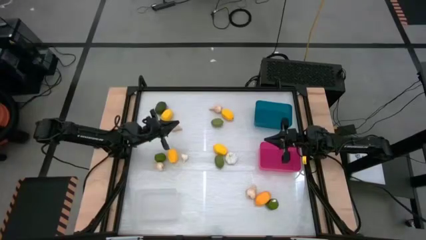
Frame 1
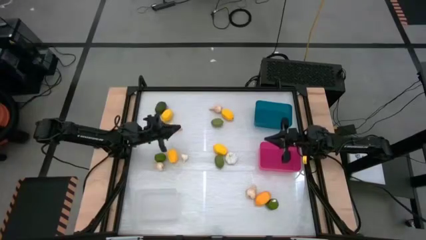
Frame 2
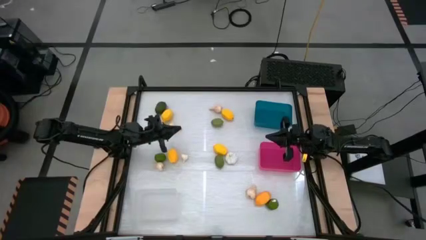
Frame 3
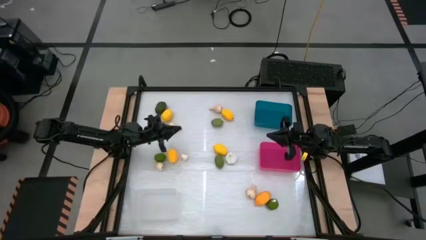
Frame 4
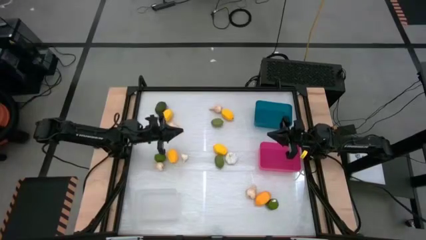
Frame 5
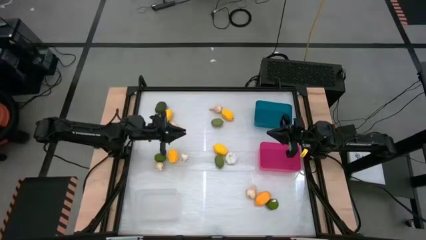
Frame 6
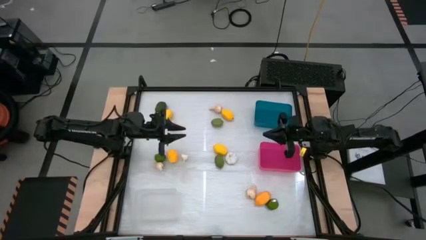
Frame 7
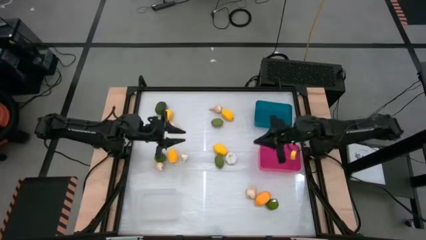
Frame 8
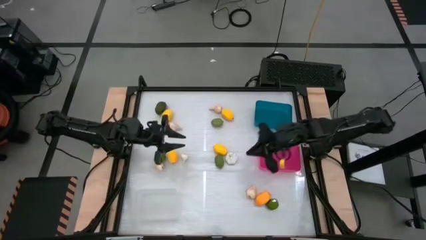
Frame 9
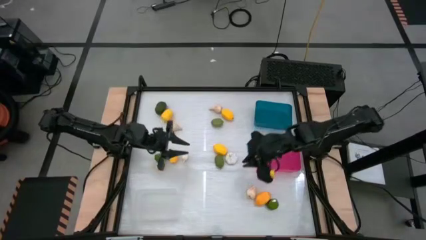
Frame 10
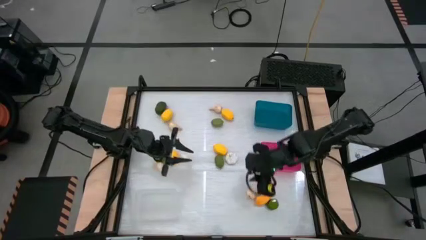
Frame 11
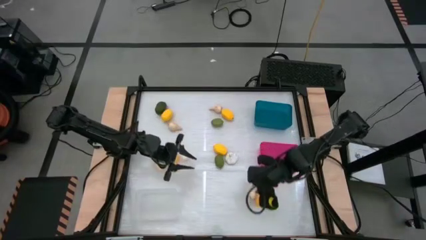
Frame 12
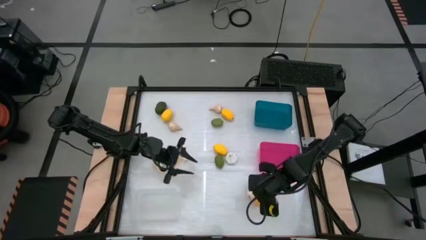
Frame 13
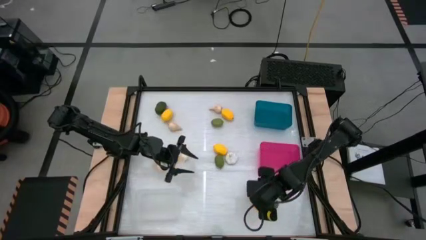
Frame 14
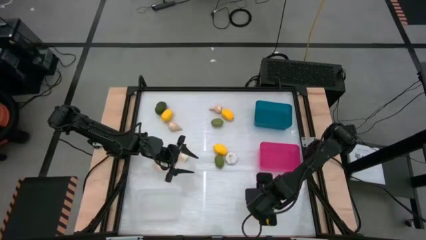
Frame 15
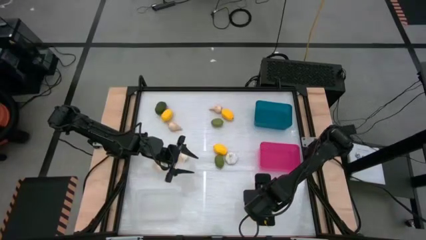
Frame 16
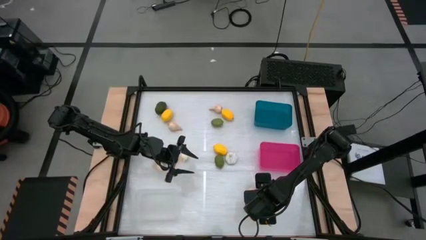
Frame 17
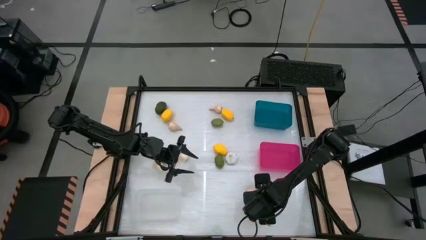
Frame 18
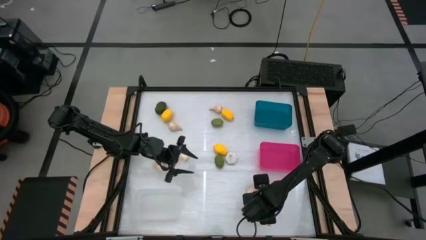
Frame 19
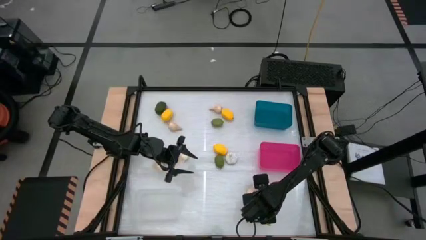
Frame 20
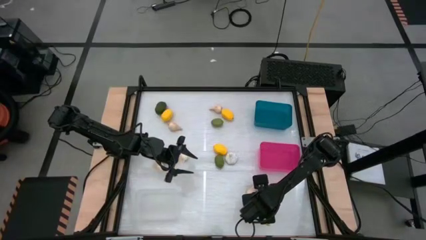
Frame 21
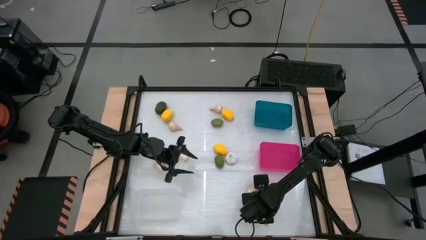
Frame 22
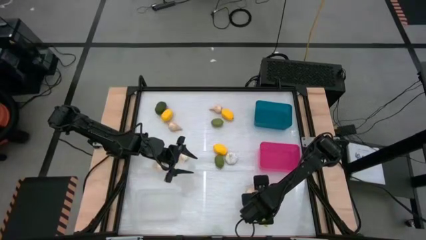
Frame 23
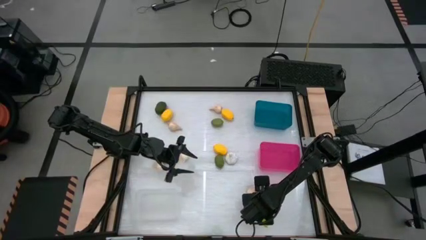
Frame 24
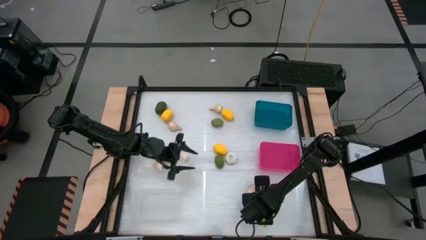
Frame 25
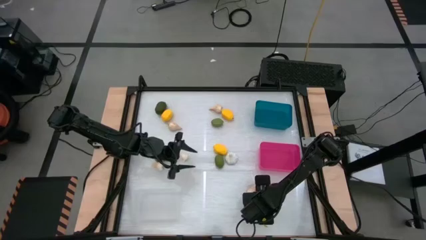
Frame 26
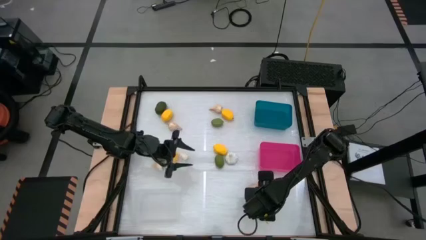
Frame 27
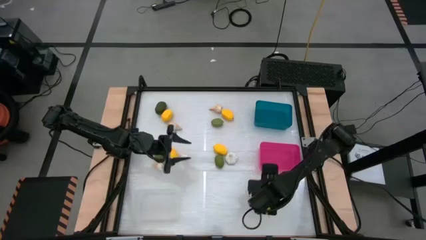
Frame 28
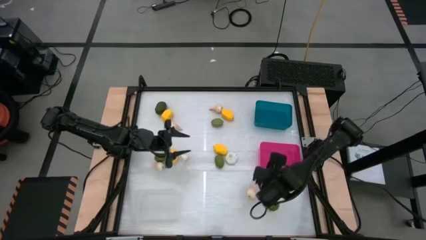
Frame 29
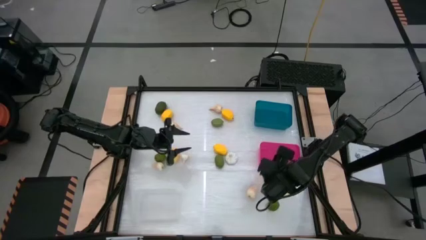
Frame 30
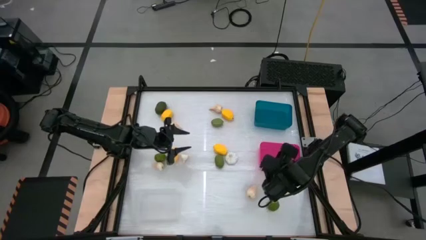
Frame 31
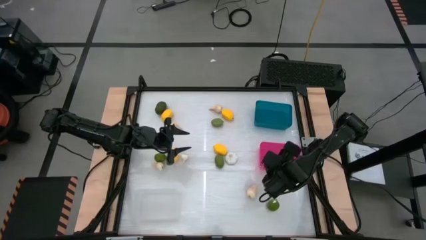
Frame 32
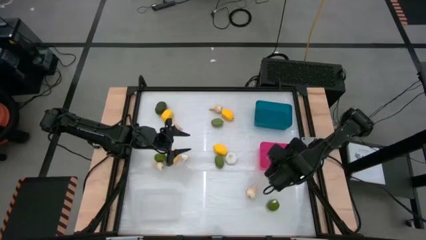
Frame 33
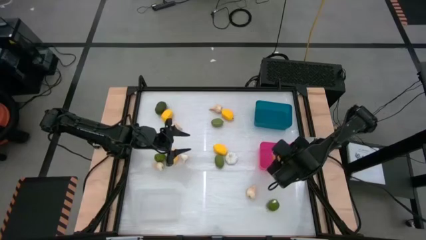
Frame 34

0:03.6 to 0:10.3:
Task: Sort produce into baskets
Put the yellow lemon into the pink bin

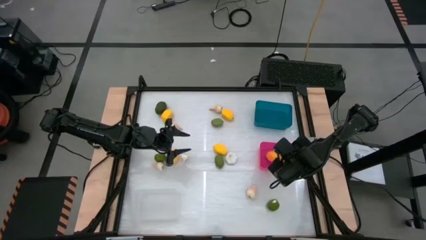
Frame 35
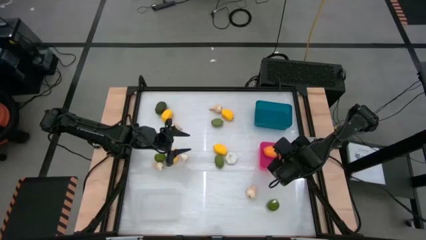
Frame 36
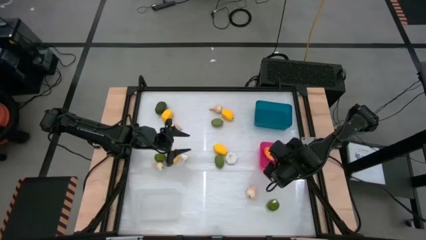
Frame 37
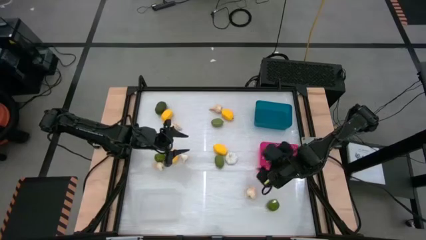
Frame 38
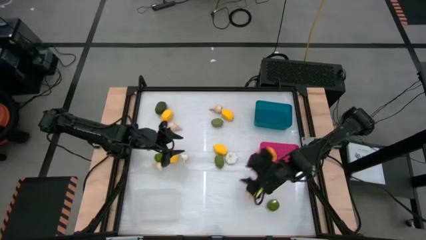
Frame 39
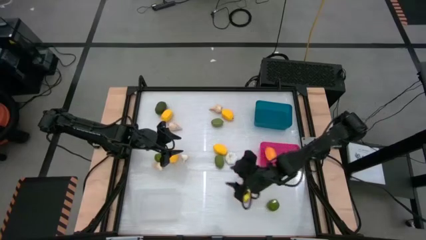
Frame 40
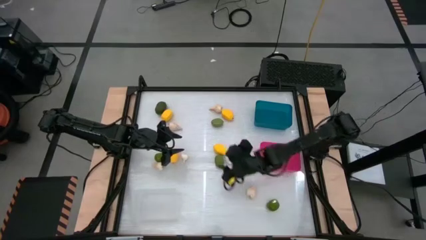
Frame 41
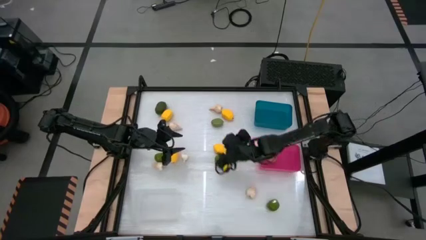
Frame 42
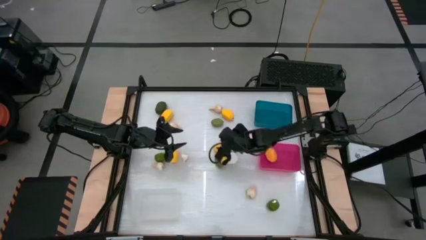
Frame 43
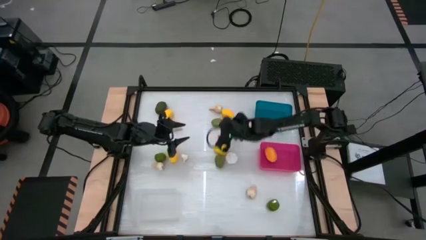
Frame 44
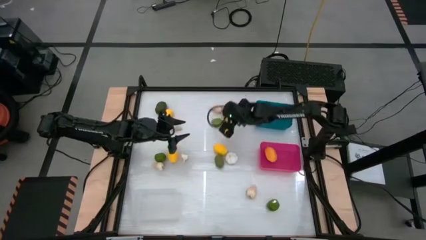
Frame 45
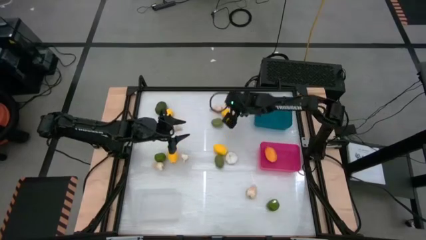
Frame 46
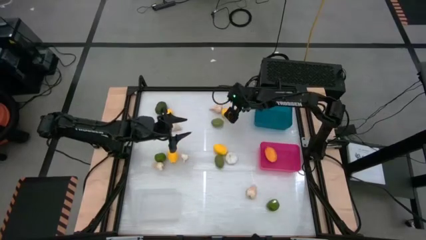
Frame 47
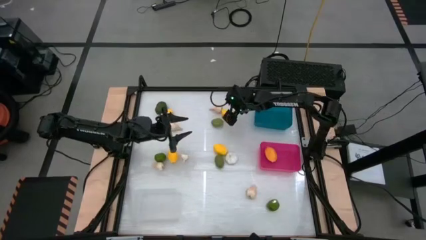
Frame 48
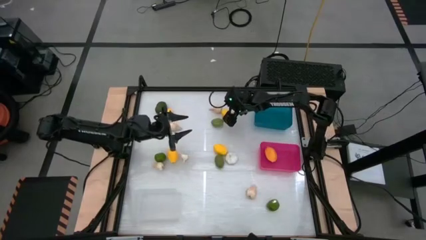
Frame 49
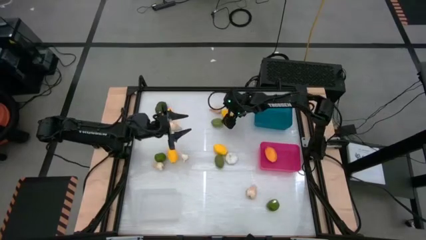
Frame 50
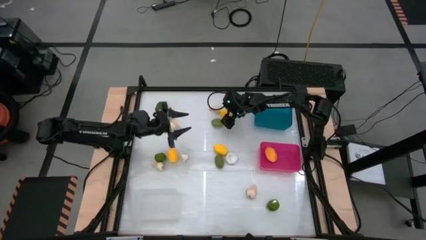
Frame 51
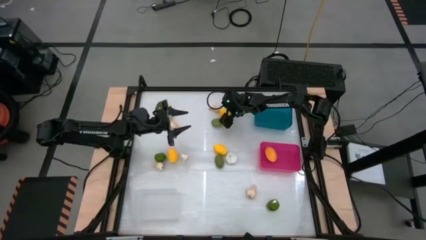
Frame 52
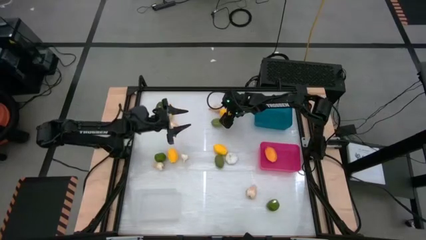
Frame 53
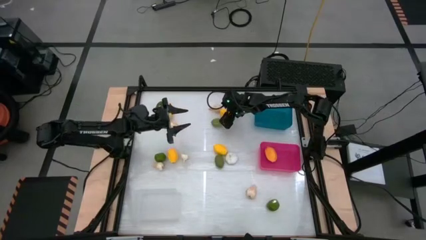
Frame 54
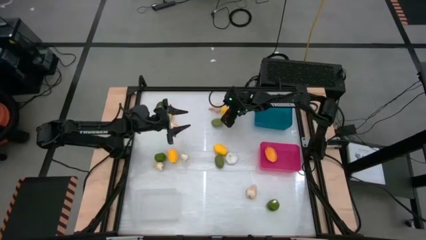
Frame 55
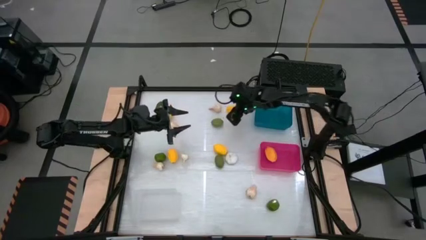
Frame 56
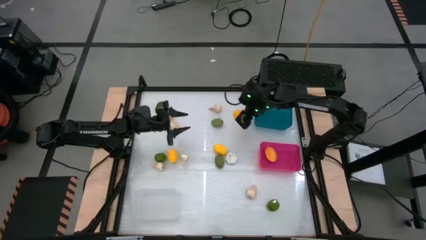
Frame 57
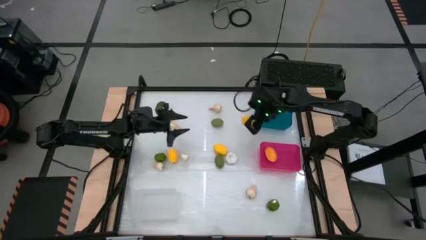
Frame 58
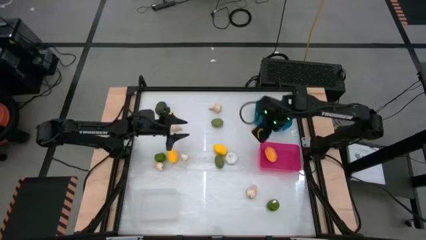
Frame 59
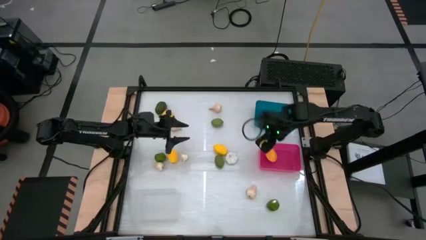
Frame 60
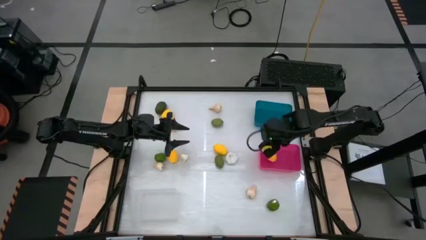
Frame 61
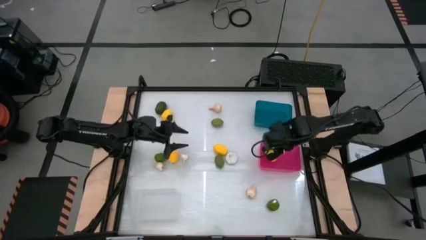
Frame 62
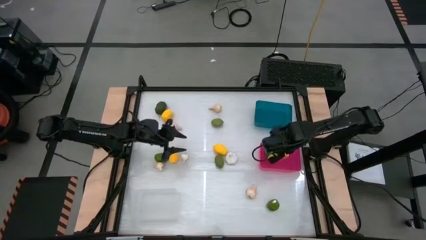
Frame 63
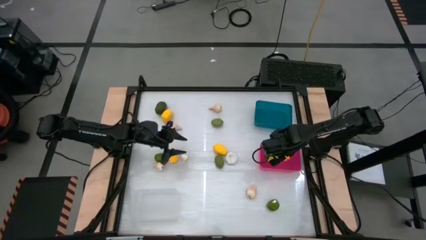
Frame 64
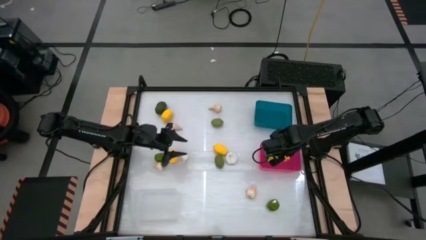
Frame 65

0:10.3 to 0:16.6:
Put the yellow lemon into the pink bin

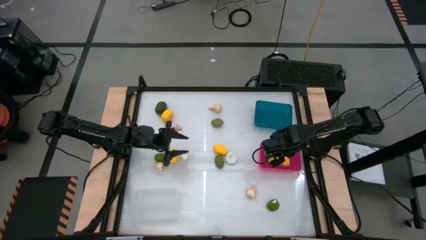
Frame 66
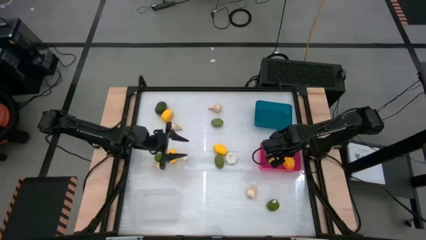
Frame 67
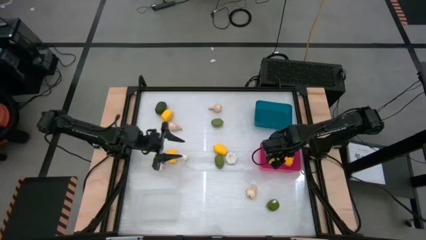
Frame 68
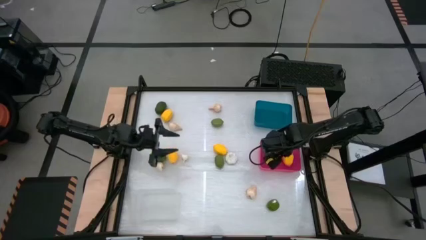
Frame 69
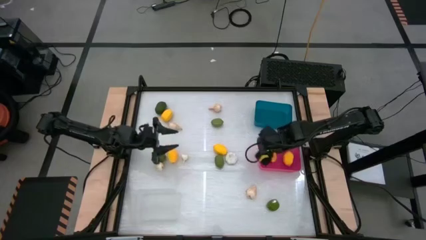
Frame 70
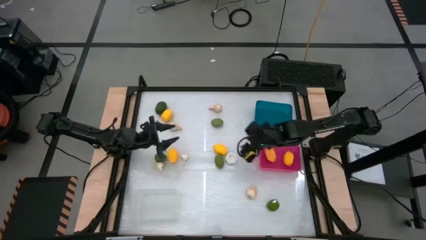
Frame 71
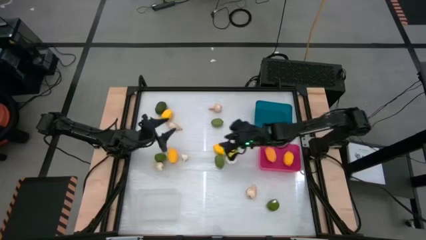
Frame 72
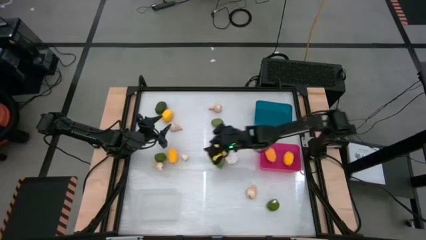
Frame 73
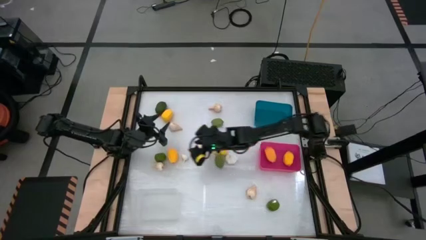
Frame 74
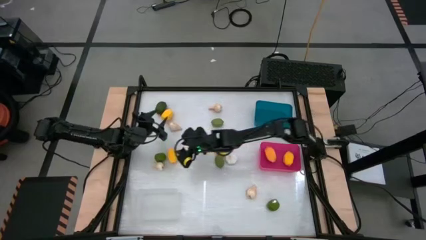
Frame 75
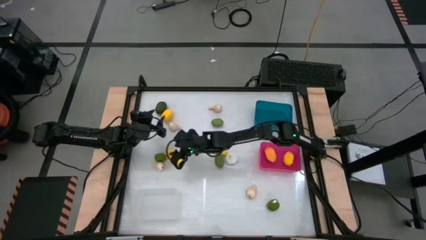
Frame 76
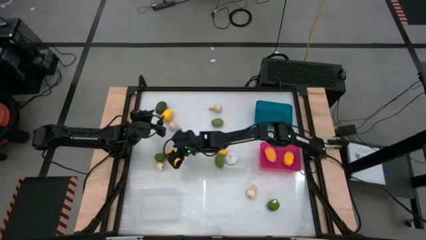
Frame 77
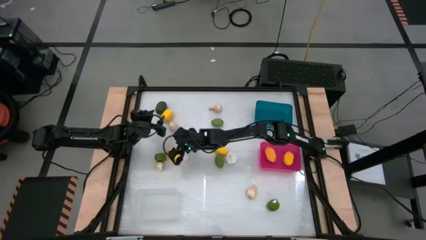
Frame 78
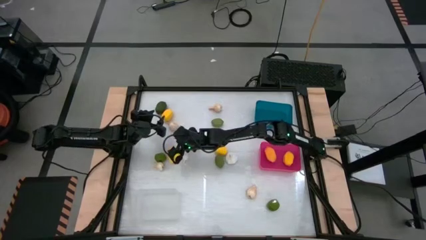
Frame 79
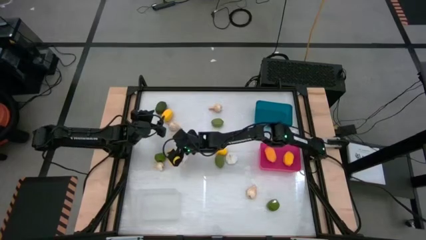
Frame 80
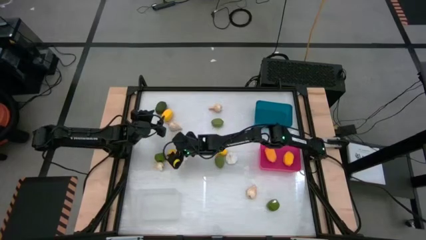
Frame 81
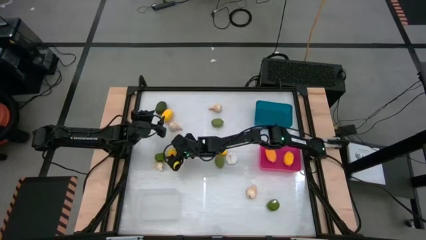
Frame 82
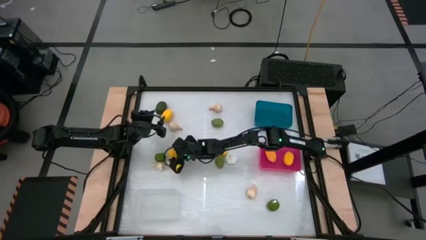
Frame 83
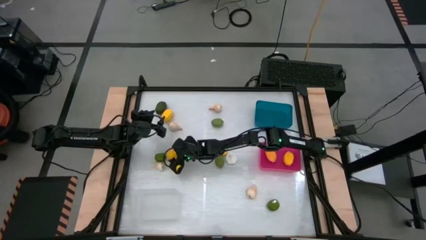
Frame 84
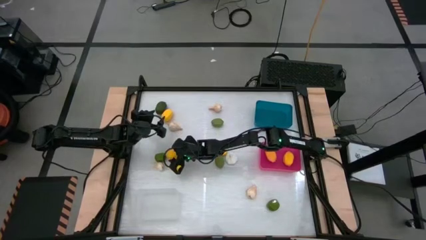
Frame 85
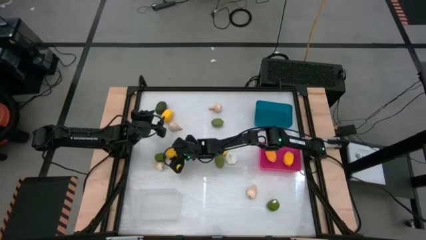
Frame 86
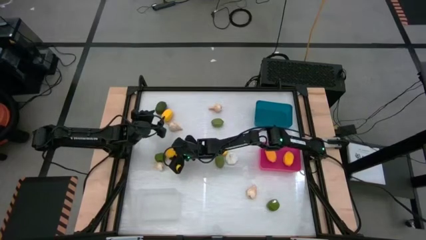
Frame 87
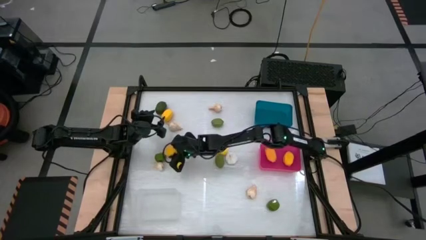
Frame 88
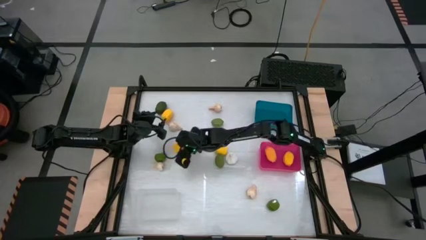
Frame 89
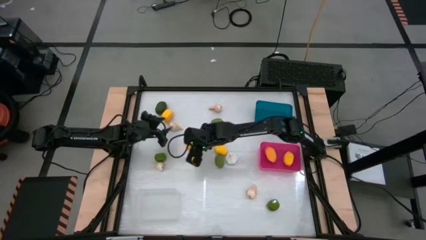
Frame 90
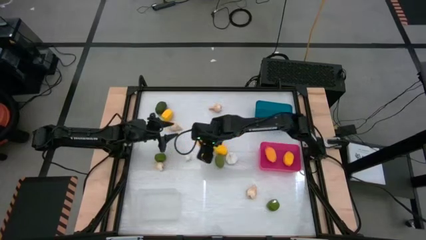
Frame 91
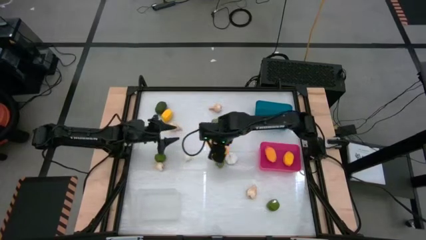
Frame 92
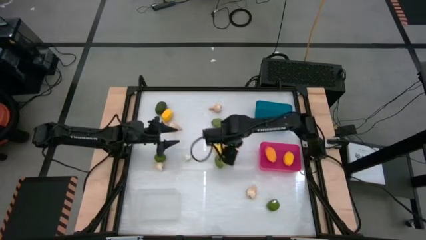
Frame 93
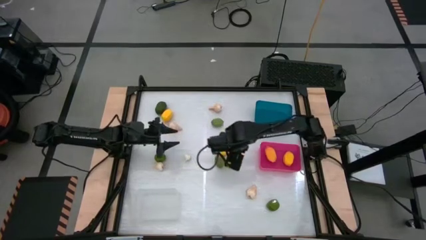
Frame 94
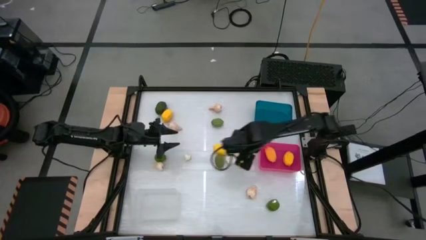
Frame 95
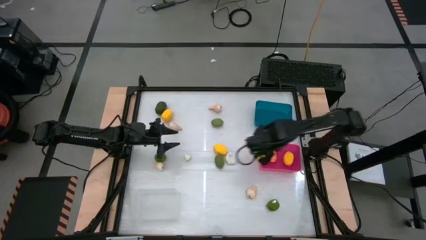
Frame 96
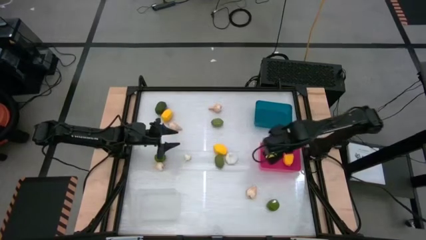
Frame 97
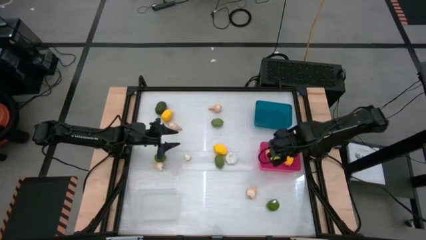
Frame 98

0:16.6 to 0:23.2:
Put the yellow lemon into the pink bin
